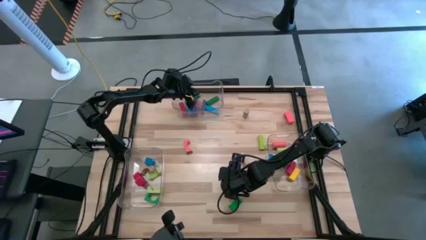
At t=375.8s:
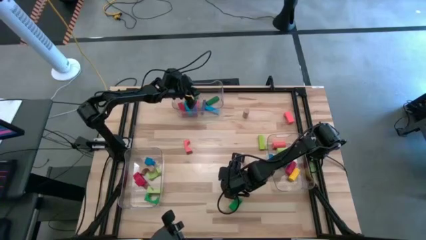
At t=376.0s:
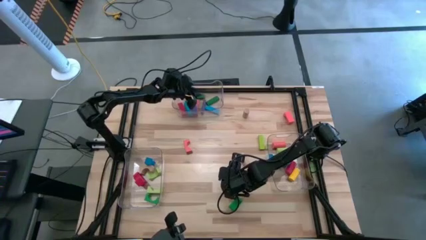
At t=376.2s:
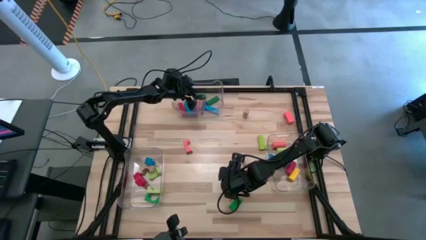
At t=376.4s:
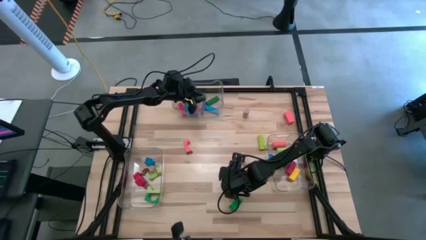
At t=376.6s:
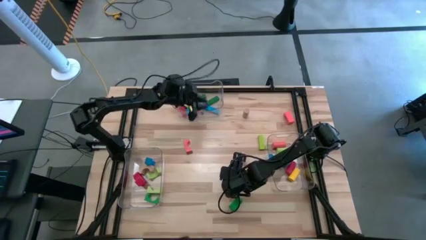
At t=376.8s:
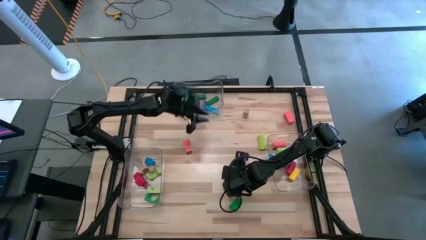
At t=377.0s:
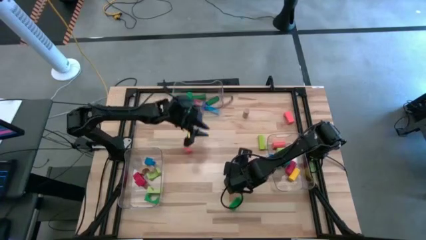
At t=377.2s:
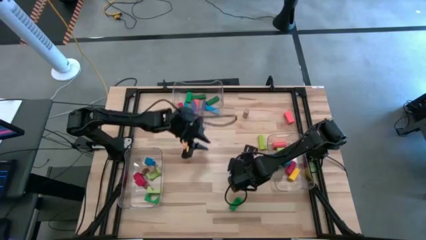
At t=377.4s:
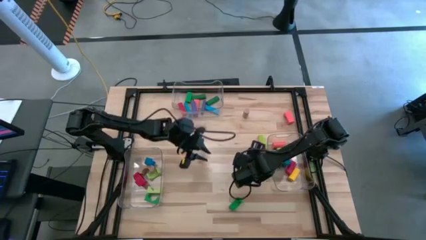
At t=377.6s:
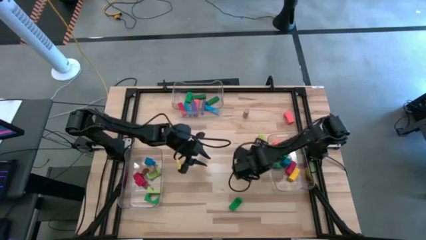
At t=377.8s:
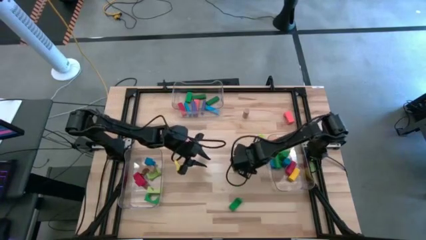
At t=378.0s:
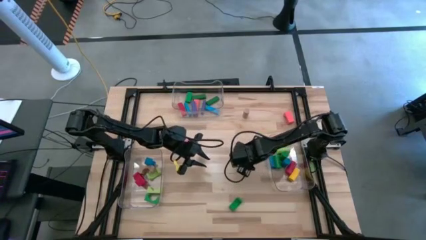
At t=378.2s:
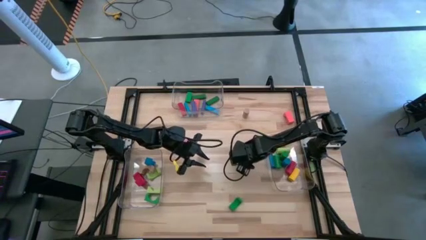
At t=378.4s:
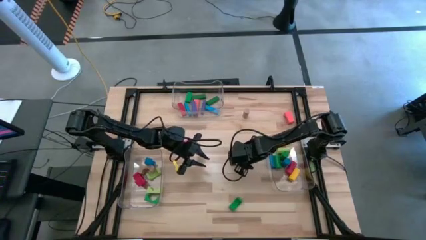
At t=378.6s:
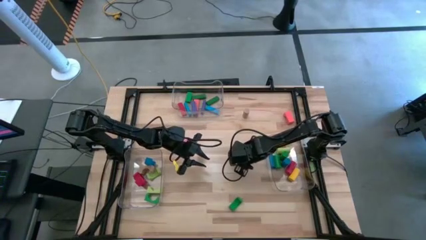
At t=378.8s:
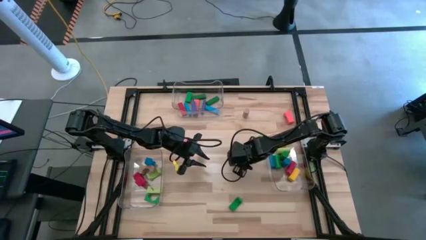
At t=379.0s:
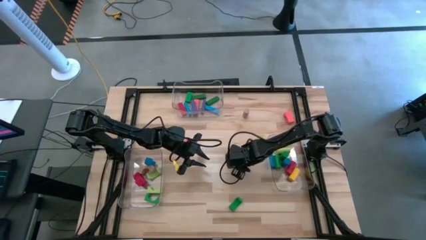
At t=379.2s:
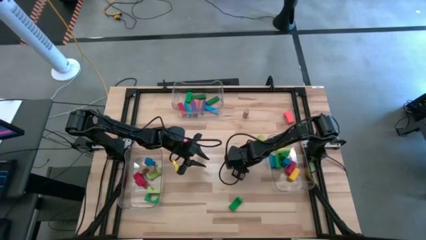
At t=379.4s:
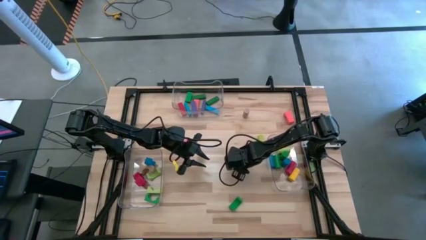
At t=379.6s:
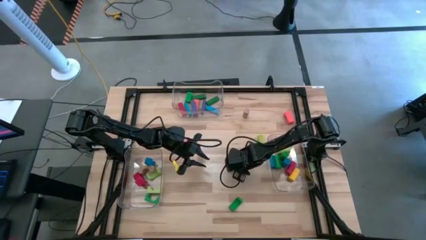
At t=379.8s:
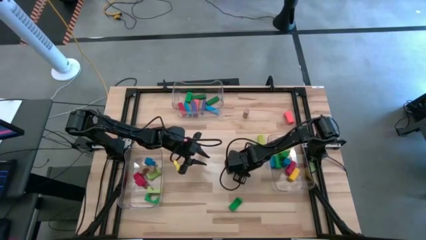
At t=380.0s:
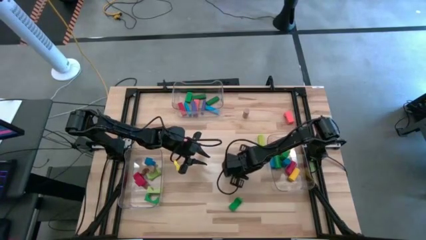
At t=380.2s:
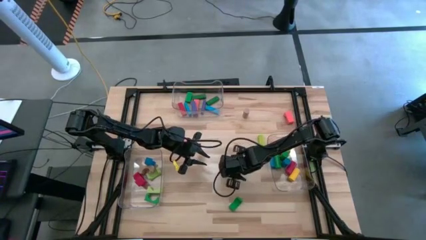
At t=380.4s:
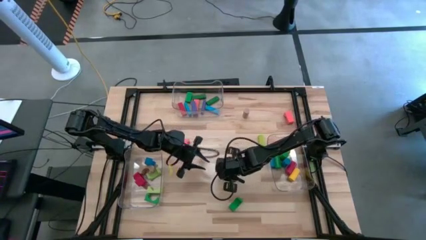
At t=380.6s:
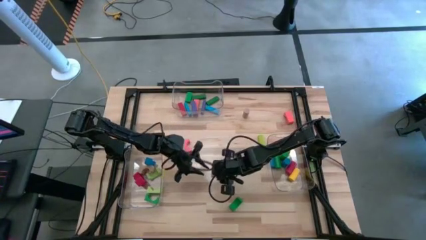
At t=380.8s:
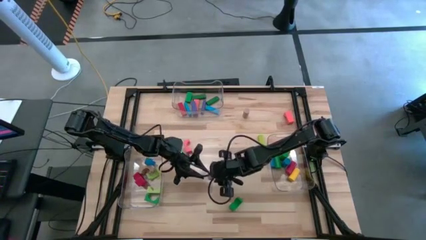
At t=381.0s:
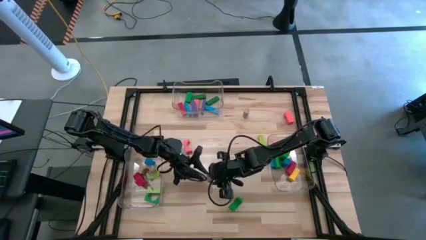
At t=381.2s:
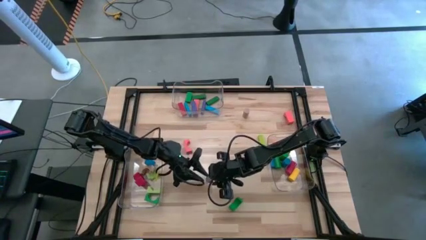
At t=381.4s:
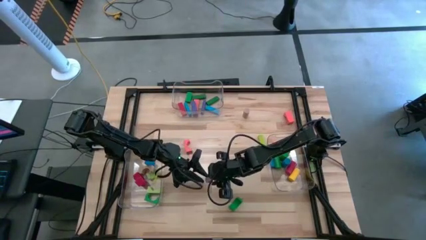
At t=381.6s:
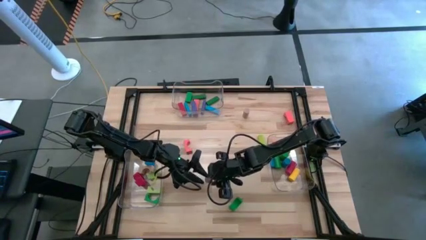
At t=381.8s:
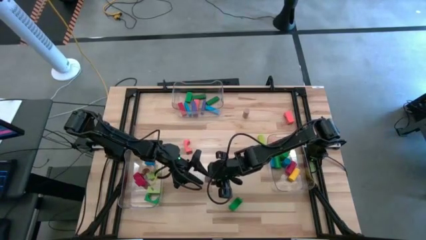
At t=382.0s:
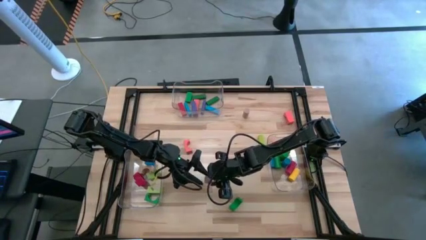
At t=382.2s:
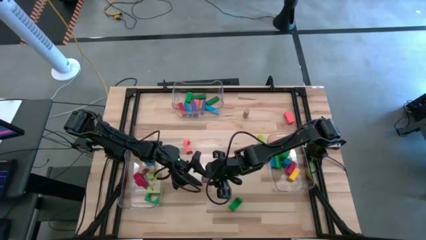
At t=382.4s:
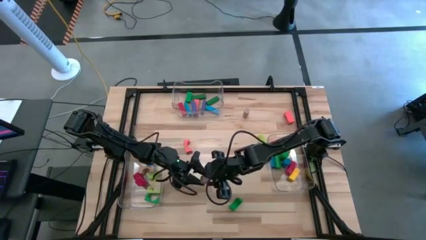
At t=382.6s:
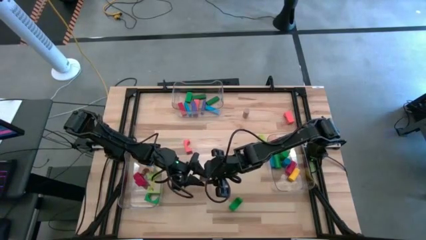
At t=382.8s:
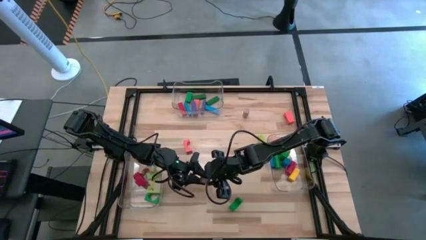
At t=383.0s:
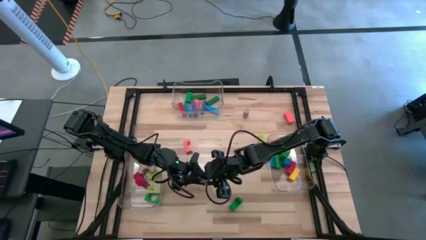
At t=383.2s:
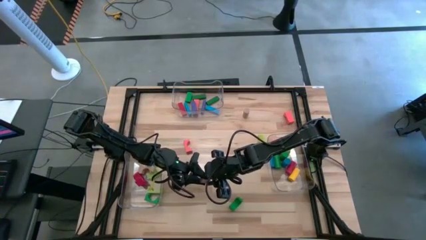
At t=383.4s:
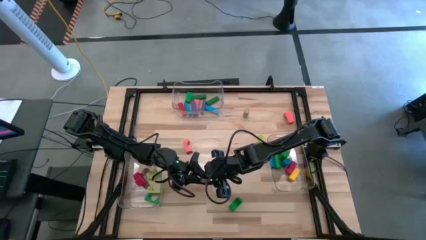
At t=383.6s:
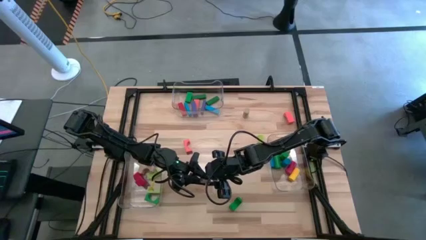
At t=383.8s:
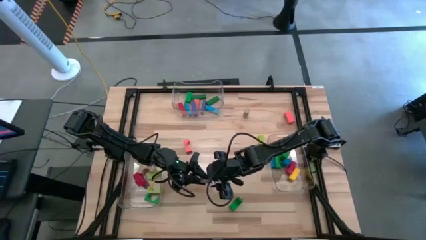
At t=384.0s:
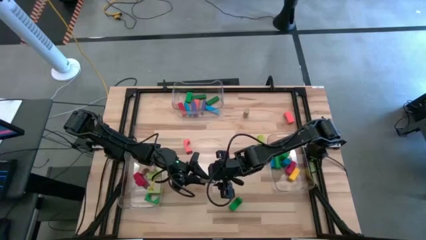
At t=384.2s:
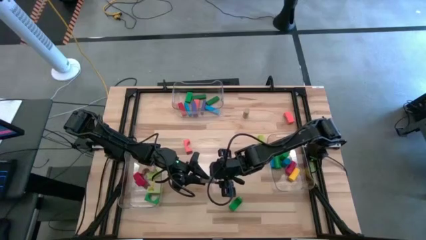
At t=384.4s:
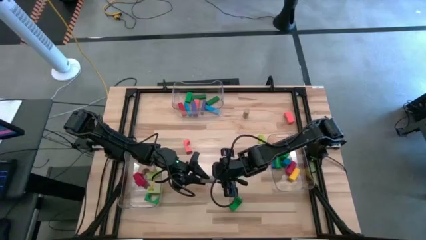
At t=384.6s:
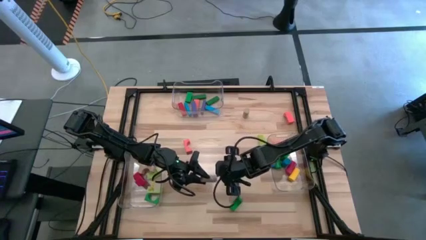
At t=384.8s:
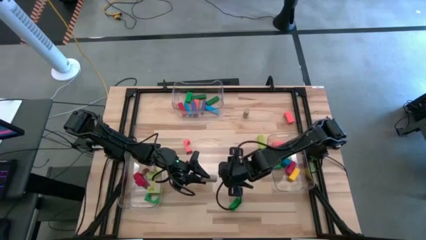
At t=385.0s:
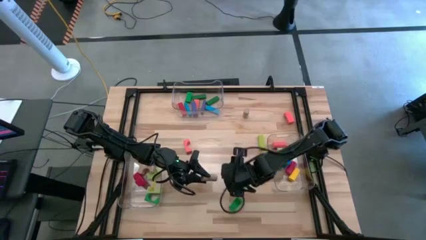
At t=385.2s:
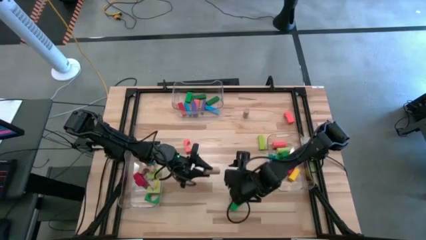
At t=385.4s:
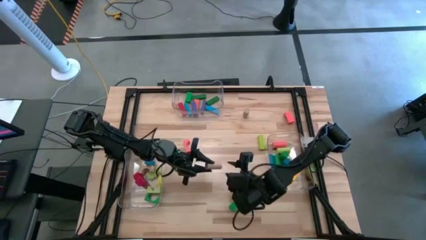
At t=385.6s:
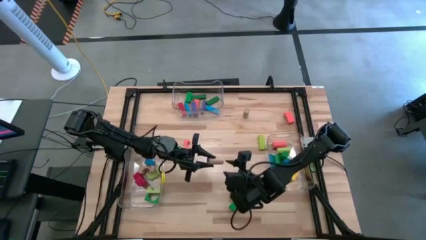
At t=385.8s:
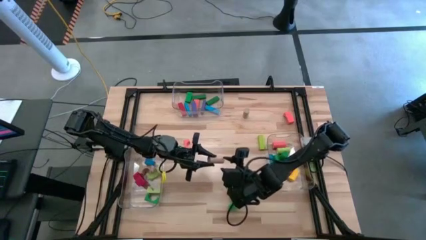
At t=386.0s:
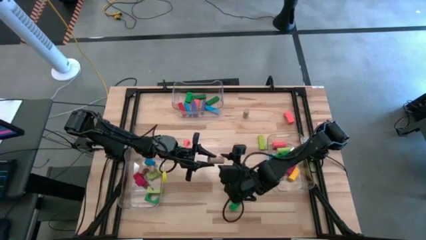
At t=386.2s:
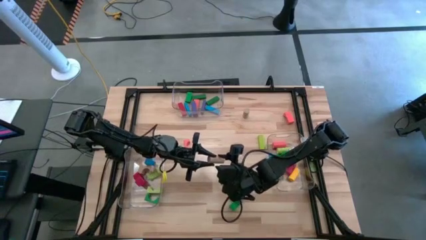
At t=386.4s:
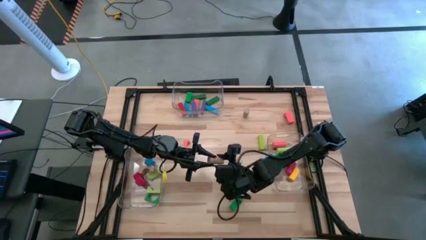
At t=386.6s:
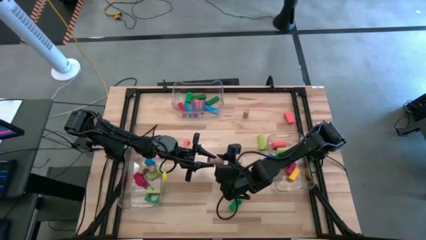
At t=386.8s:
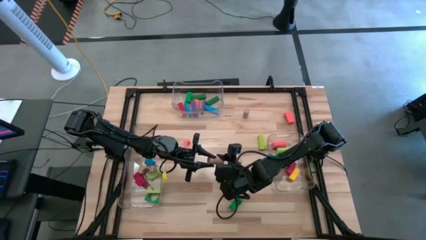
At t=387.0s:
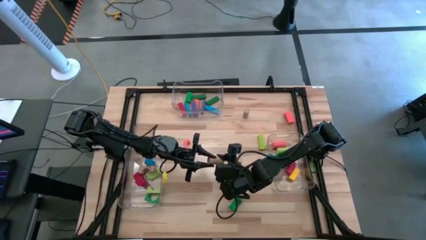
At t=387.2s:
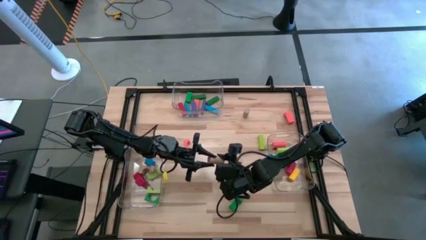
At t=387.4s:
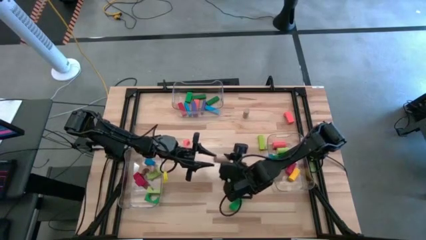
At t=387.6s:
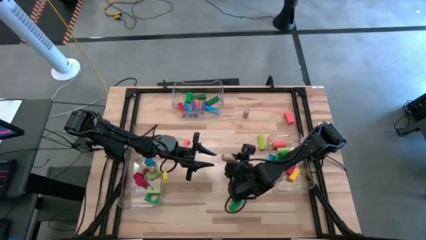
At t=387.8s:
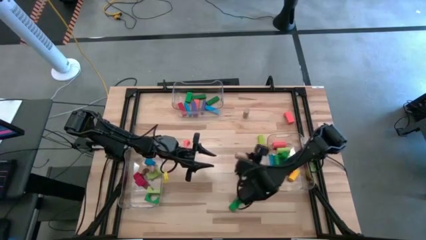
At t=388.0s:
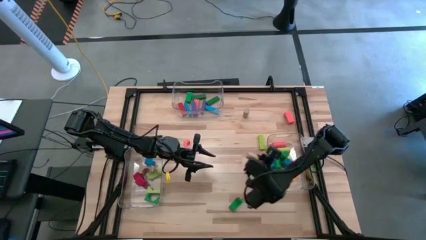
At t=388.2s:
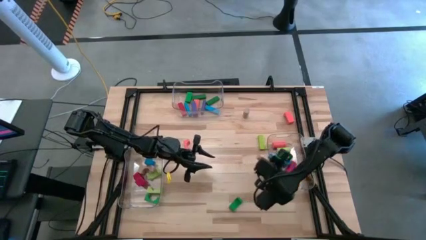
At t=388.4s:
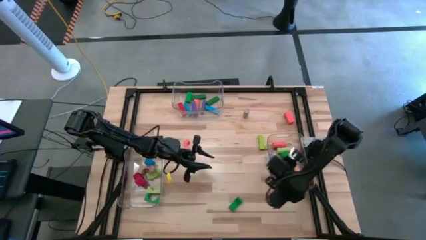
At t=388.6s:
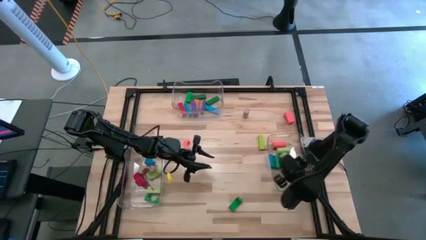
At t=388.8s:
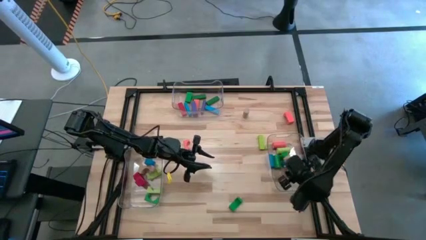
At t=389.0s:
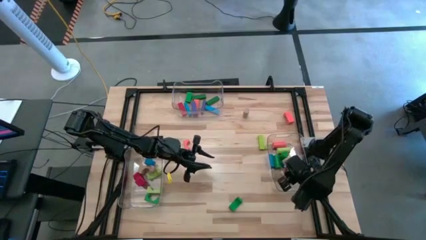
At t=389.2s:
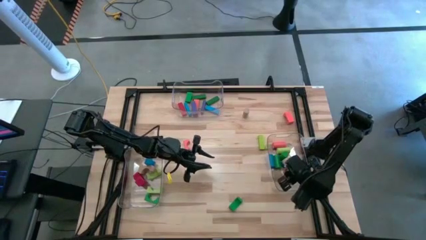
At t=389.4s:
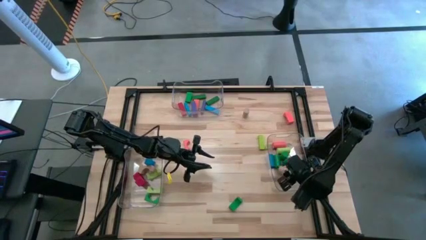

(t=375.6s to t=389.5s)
Task: Sort blocks by size
Put the brown cylindrical block into the right transparent bin
